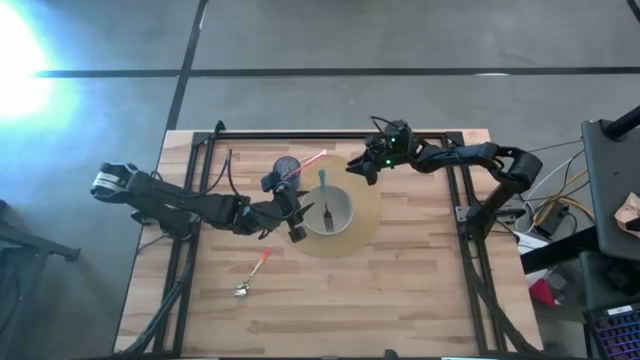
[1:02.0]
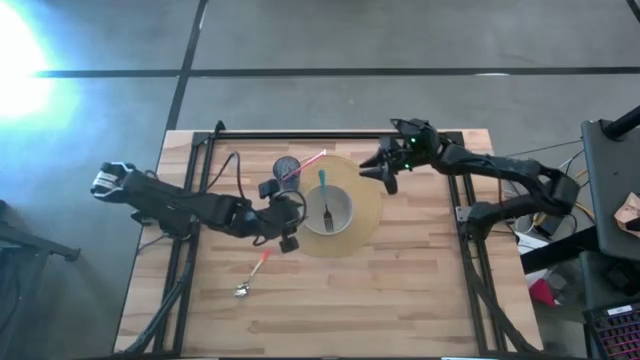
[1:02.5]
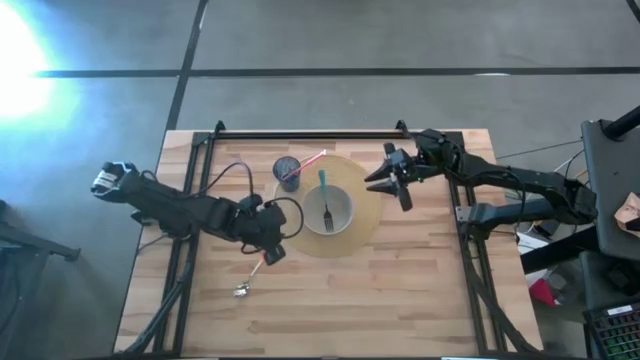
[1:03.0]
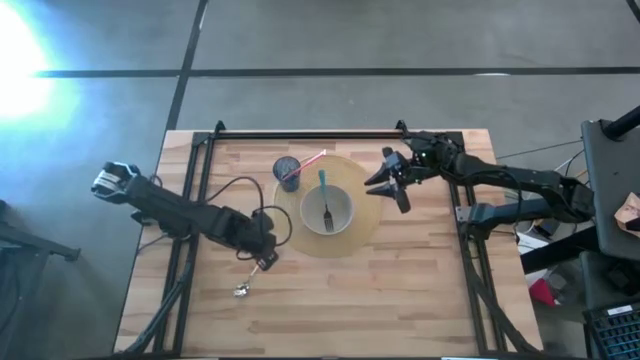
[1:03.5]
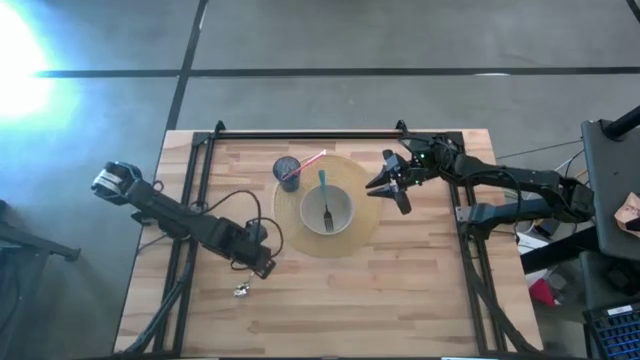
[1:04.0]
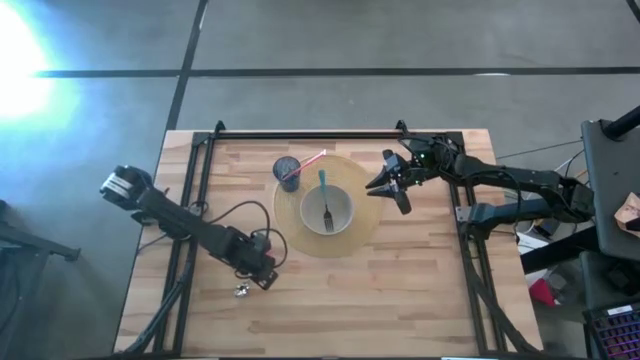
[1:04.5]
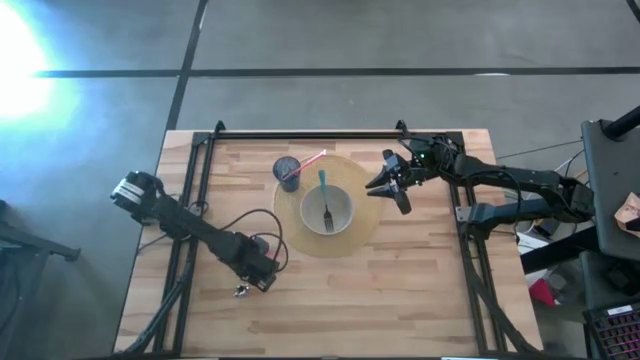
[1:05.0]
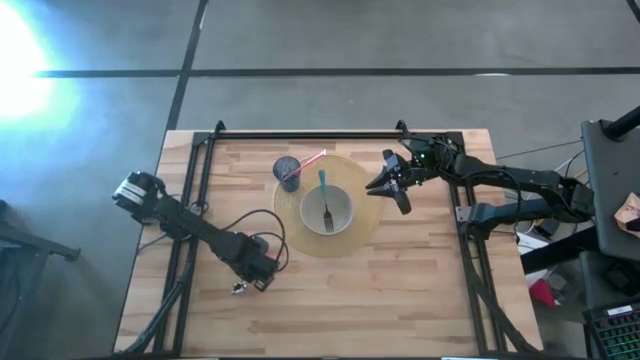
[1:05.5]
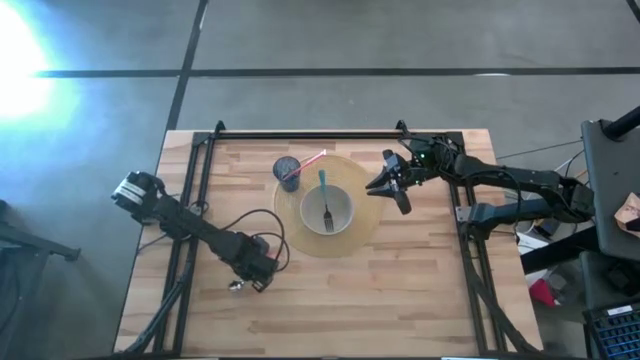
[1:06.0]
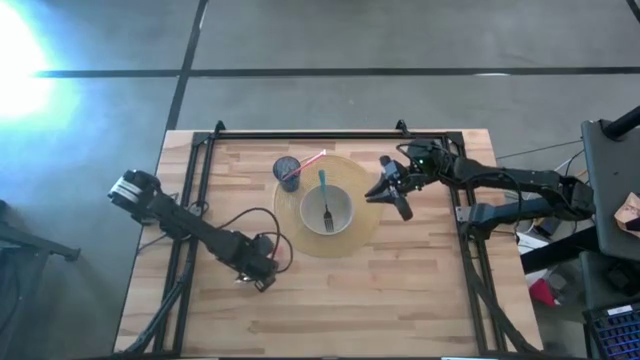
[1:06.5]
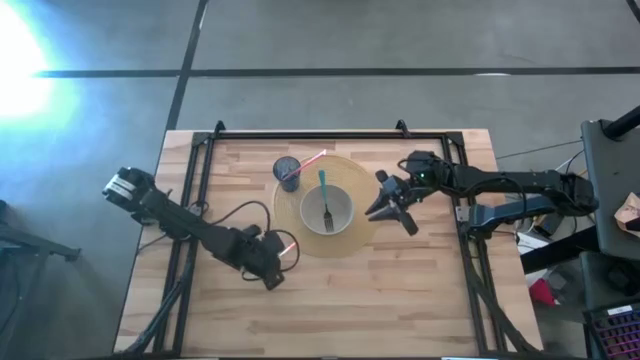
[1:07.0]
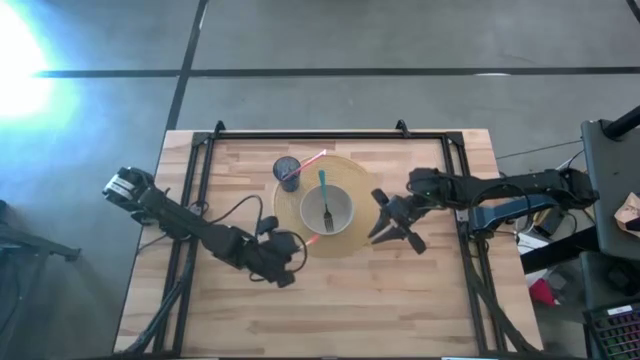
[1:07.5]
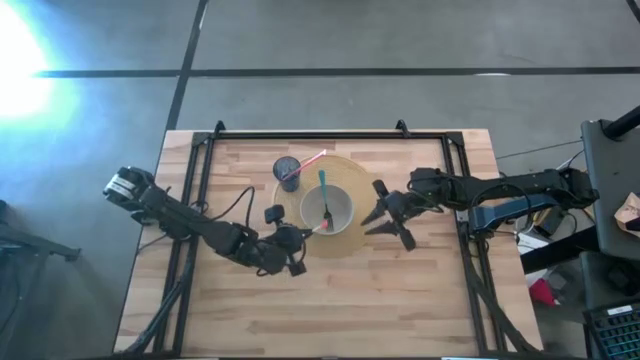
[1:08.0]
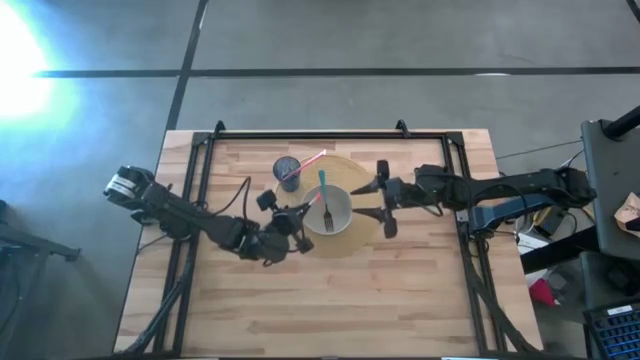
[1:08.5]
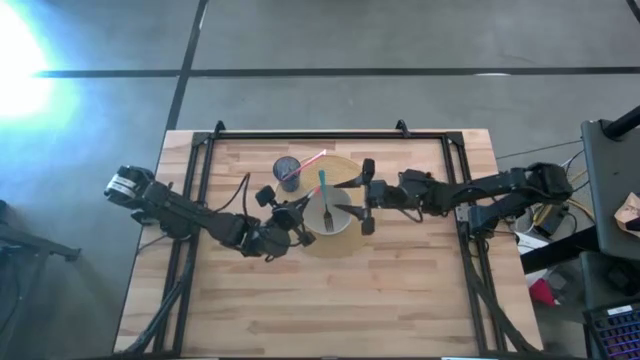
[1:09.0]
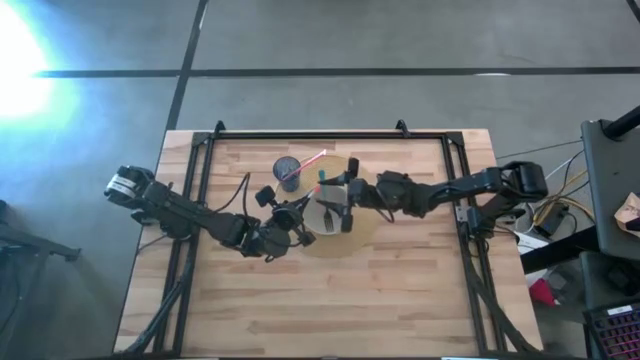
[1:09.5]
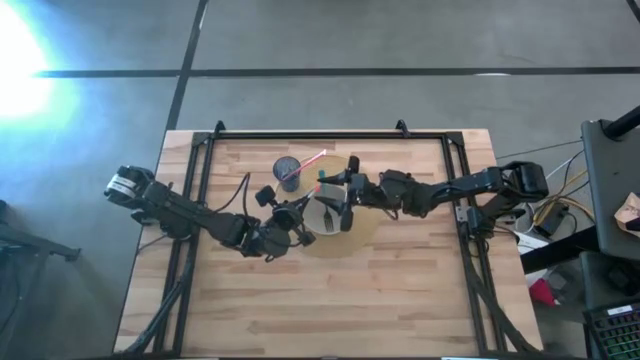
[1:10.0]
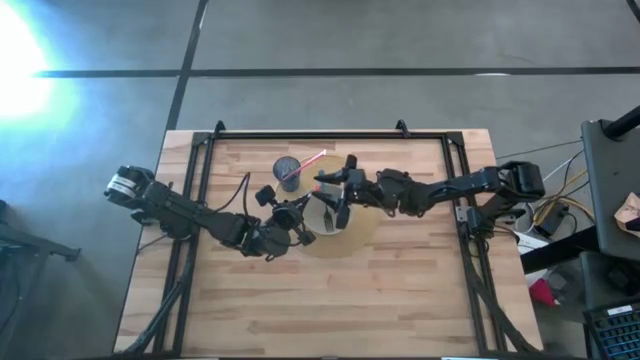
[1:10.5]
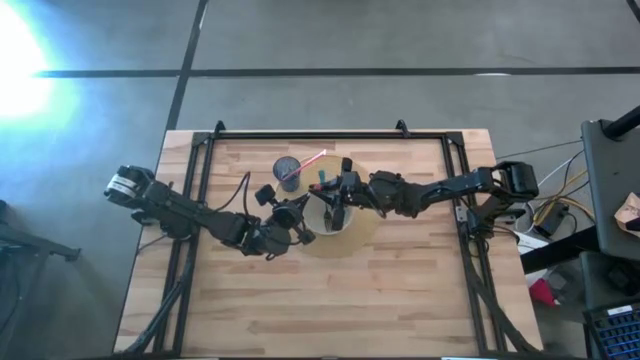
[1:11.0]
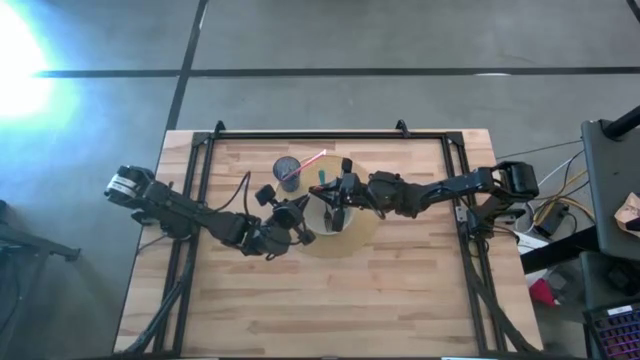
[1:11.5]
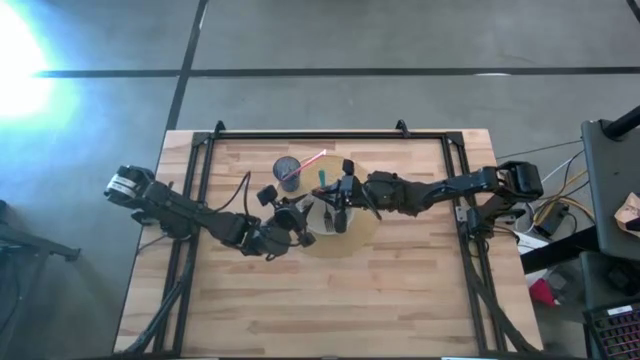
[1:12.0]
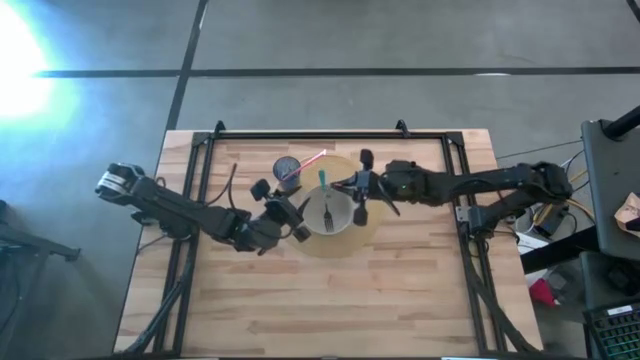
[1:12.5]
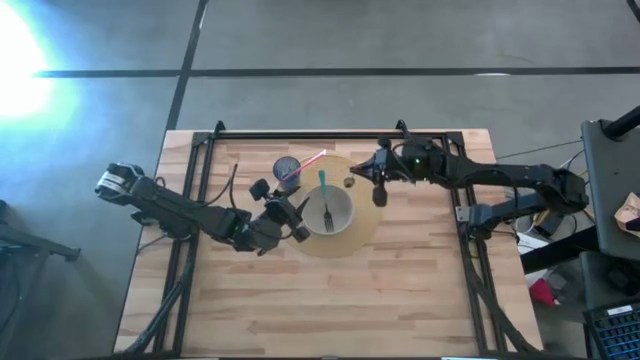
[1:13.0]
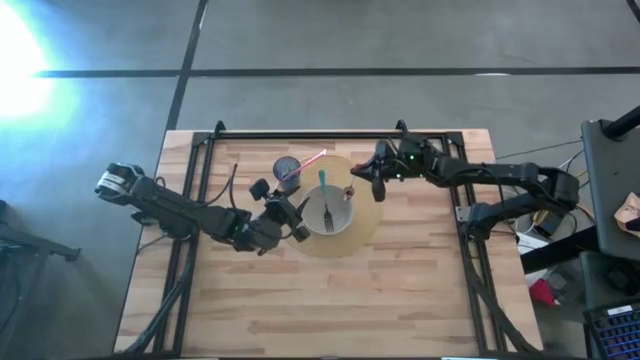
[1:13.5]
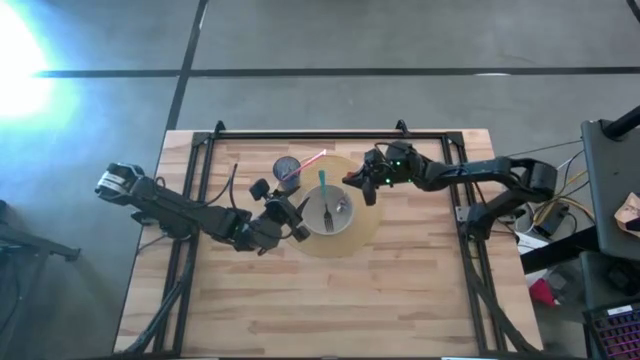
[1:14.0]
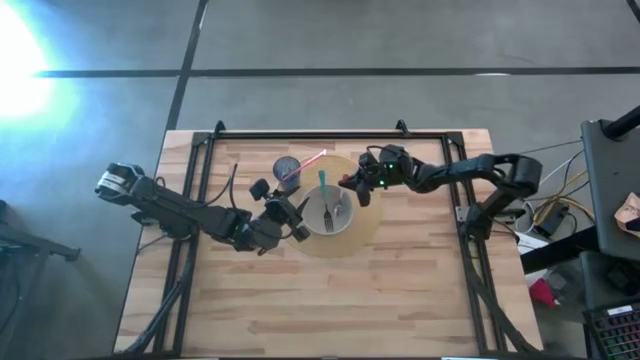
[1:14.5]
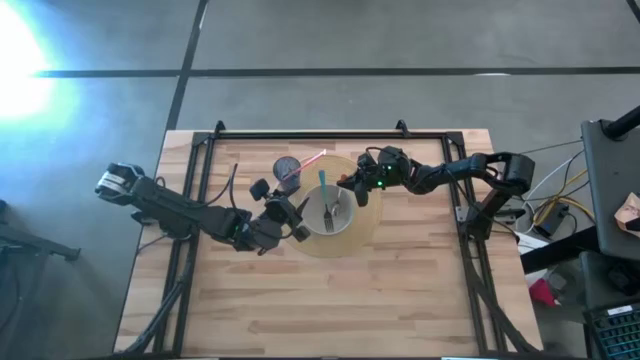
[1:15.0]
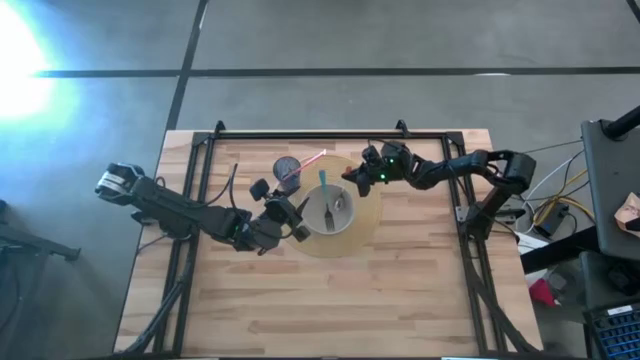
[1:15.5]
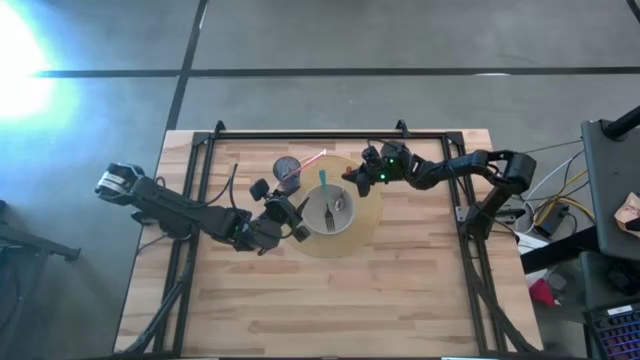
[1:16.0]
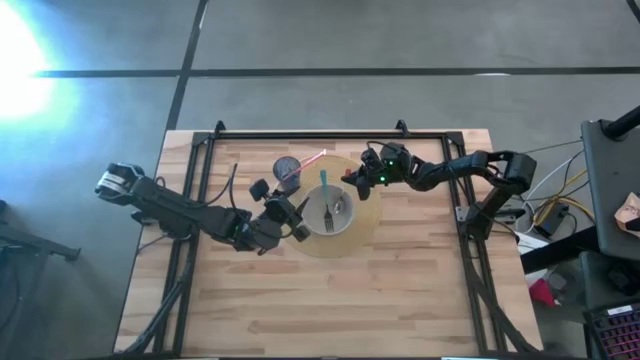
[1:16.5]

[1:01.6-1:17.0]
Task: Pick & Place Utensil
Put the orange spoon into the gray bowl on the brown mat

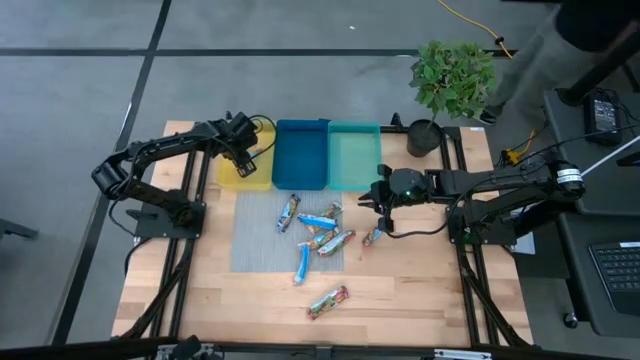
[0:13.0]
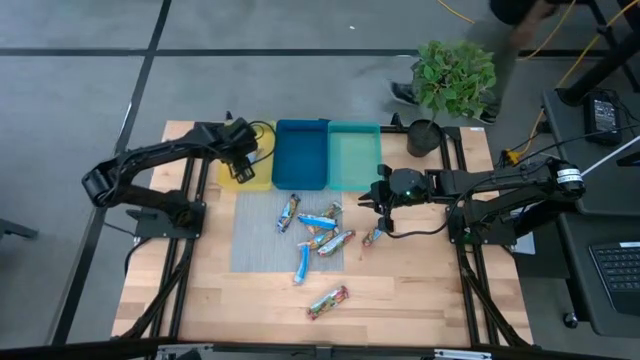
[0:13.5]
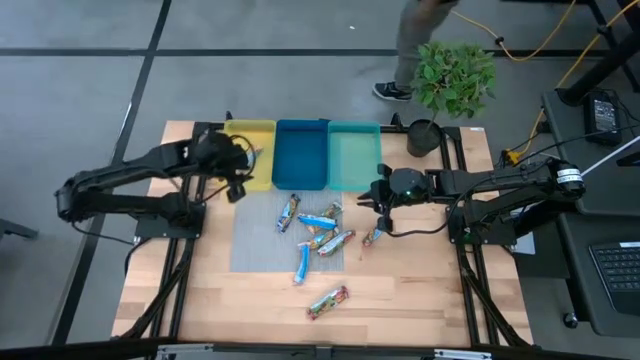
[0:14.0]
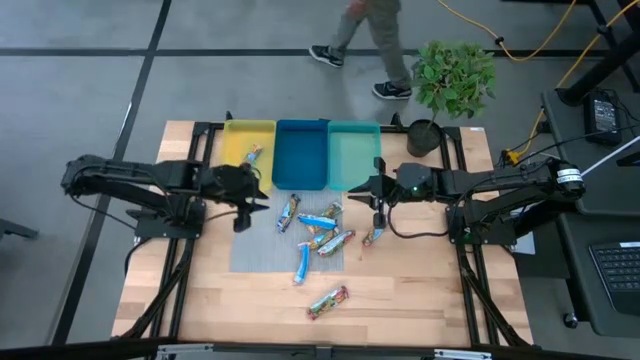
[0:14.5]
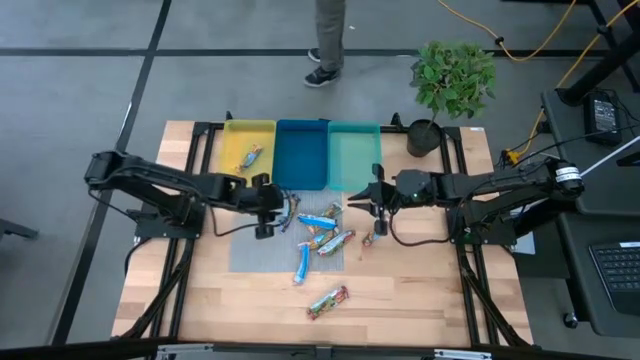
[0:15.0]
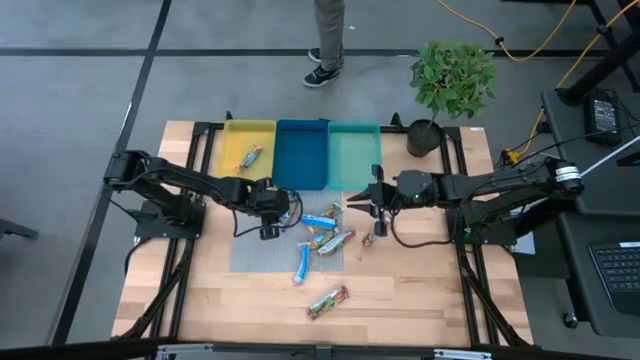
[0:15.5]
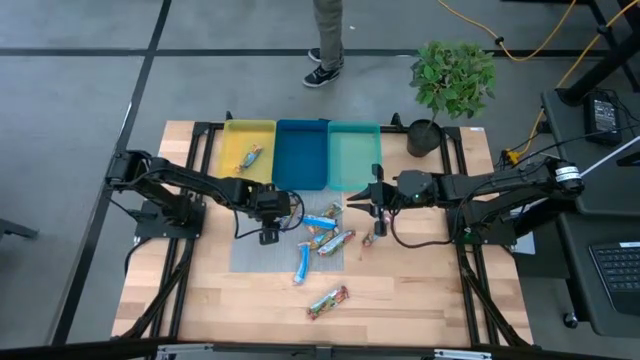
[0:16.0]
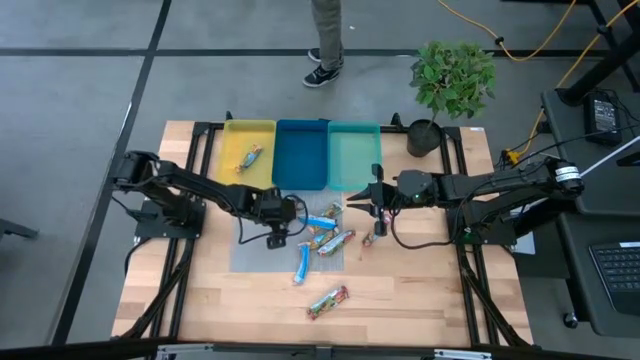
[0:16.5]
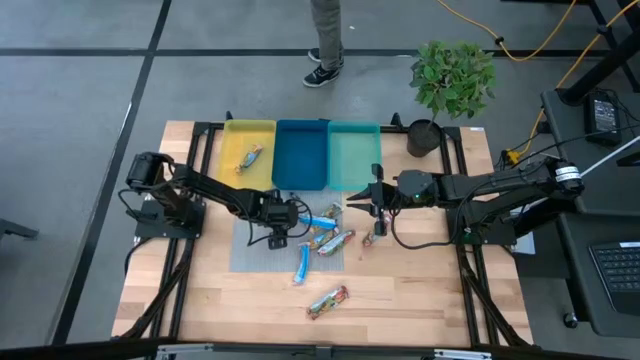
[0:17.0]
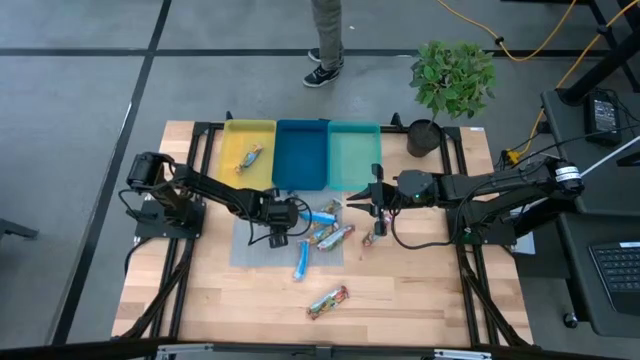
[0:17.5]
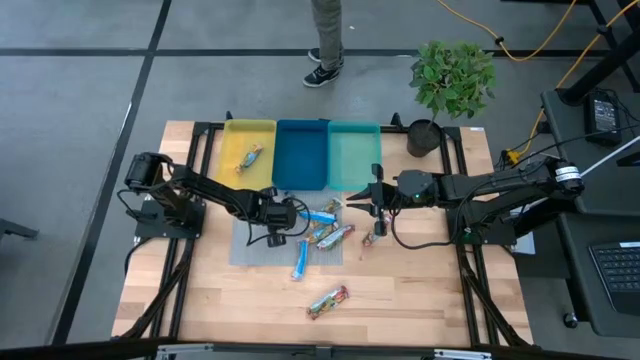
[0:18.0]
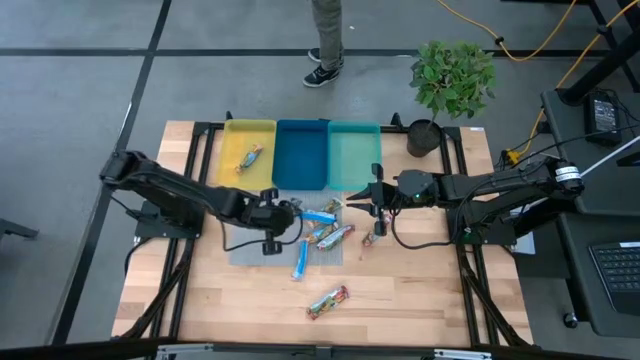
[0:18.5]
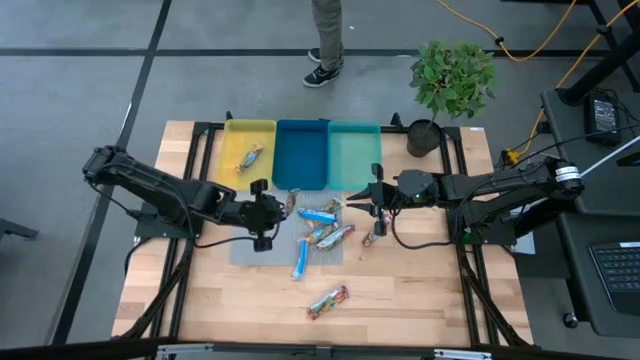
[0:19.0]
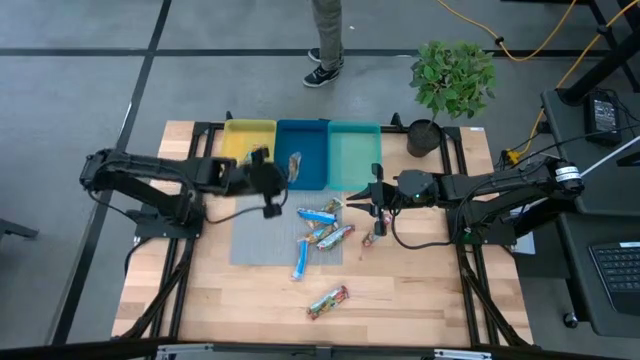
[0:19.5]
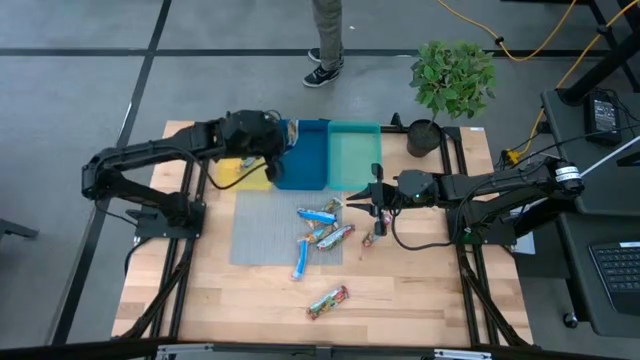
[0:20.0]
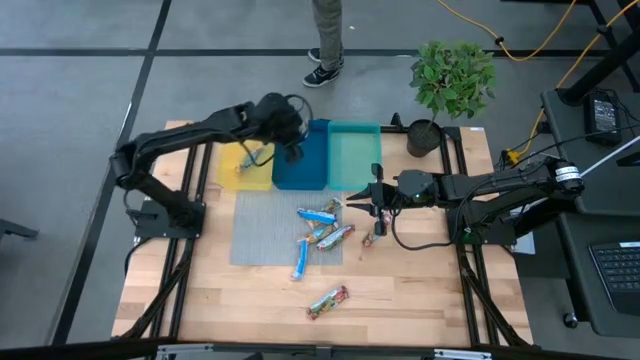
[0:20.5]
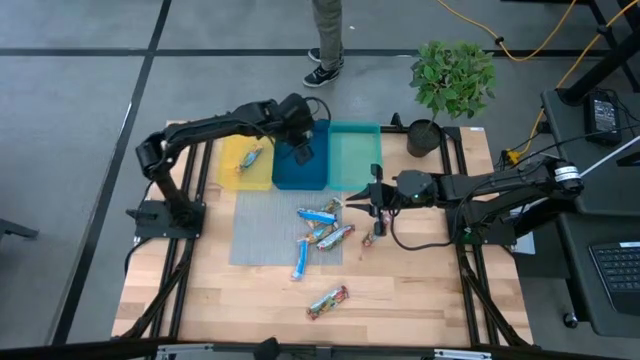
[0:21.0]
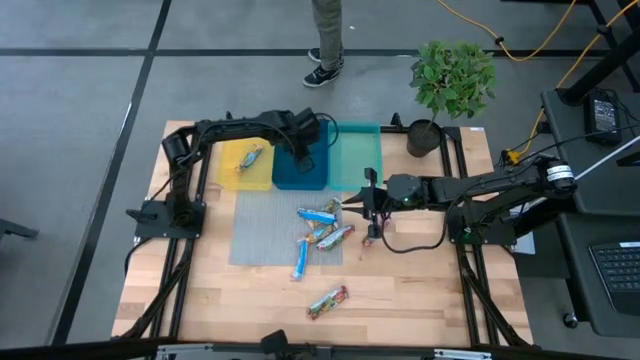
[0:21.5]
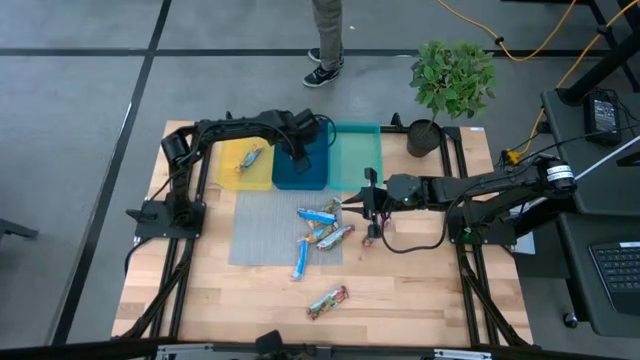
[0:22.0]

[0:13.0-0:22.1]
Task: Pick and place Granola Bars by type
Put the left blue granola bar into the blue bin
